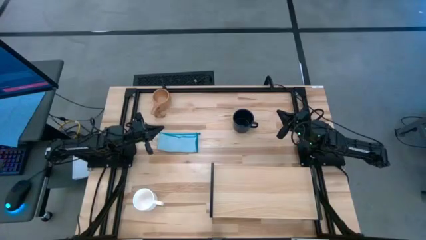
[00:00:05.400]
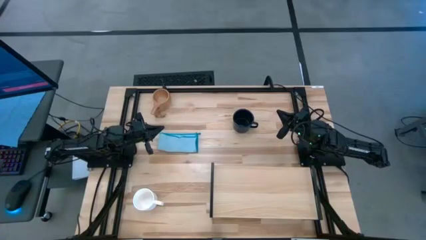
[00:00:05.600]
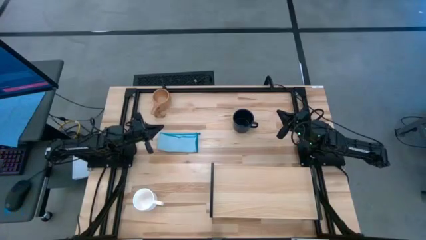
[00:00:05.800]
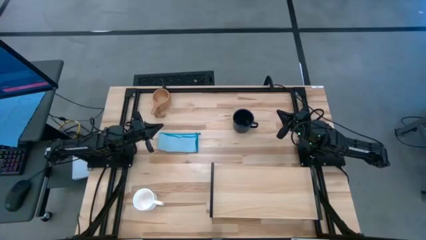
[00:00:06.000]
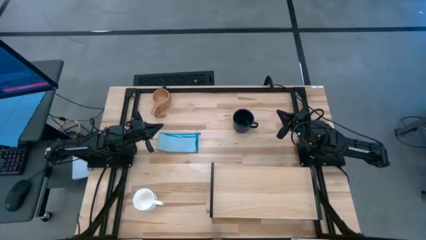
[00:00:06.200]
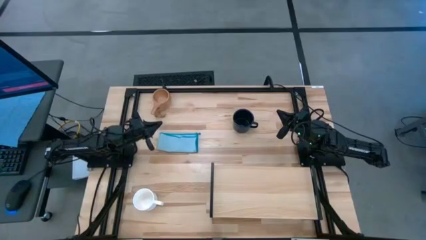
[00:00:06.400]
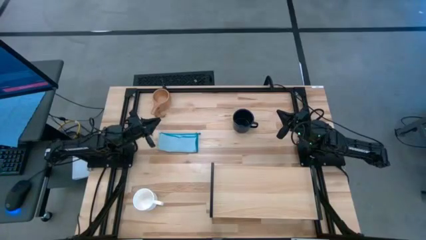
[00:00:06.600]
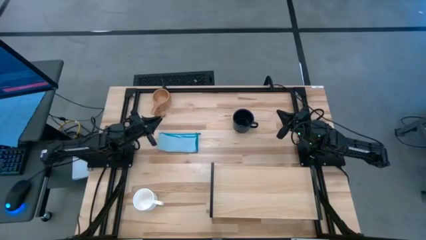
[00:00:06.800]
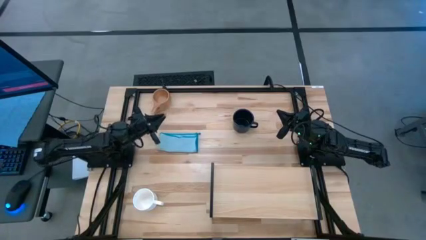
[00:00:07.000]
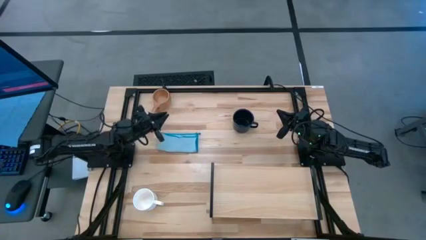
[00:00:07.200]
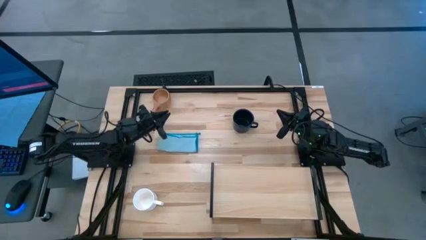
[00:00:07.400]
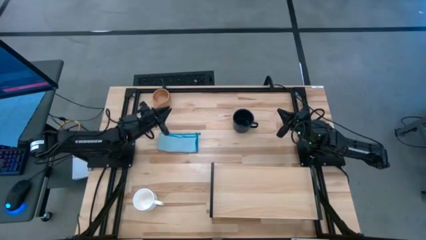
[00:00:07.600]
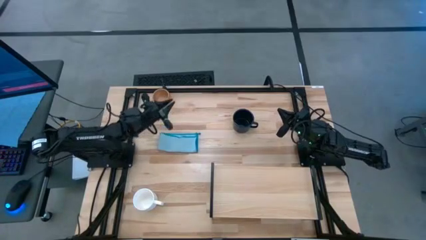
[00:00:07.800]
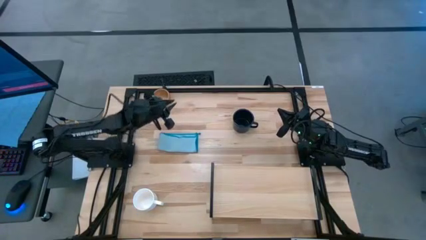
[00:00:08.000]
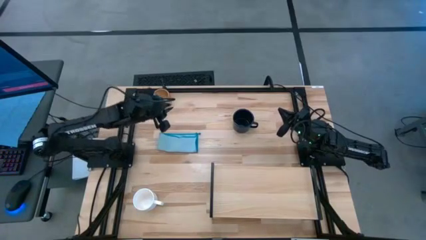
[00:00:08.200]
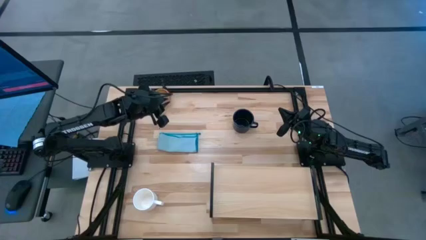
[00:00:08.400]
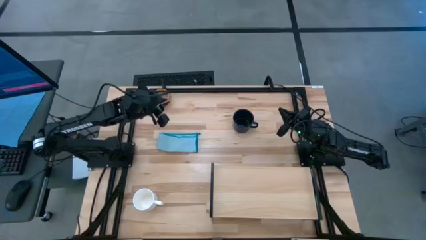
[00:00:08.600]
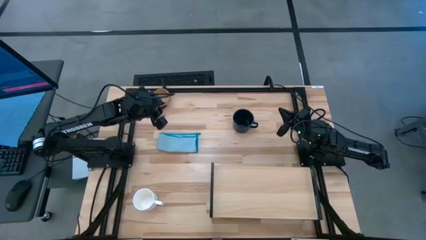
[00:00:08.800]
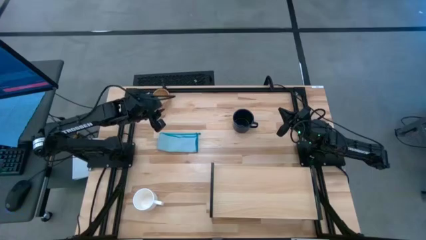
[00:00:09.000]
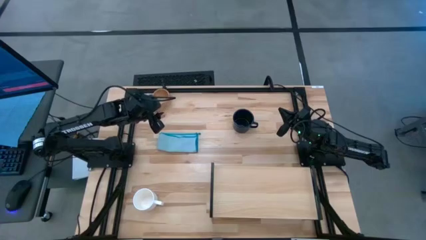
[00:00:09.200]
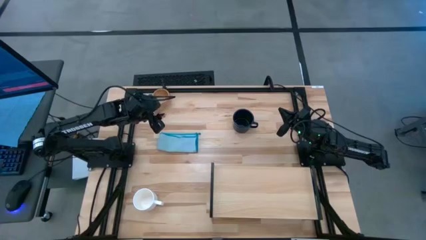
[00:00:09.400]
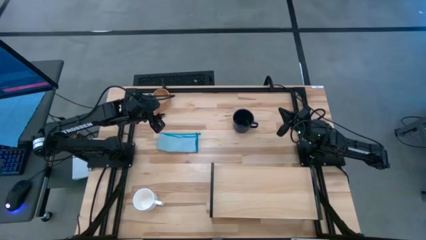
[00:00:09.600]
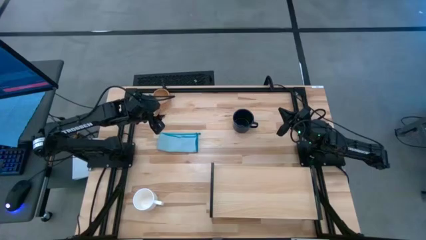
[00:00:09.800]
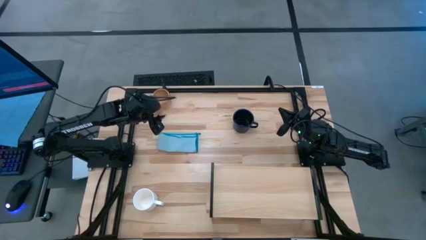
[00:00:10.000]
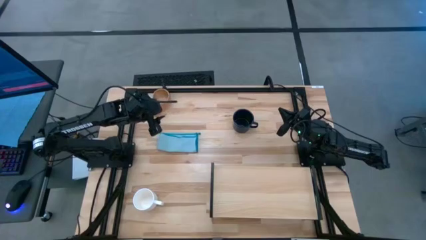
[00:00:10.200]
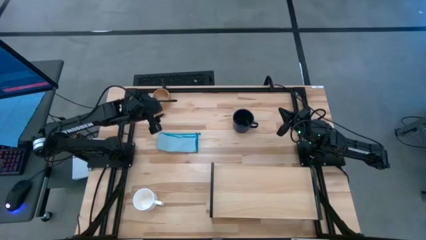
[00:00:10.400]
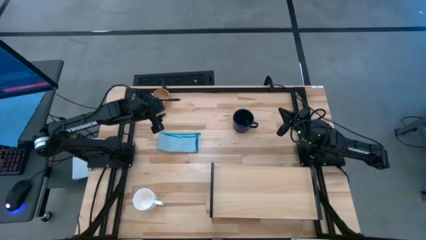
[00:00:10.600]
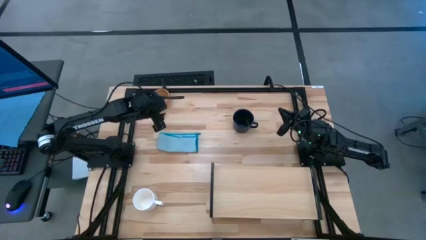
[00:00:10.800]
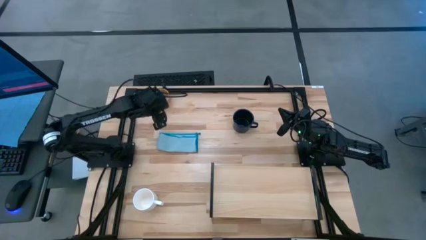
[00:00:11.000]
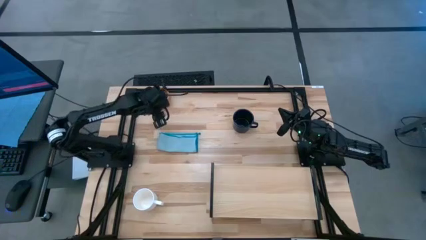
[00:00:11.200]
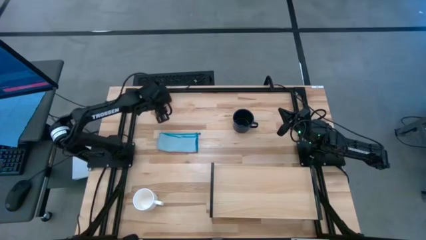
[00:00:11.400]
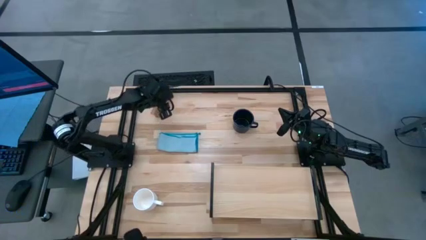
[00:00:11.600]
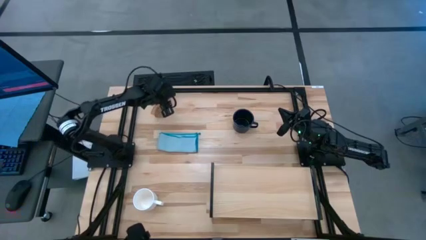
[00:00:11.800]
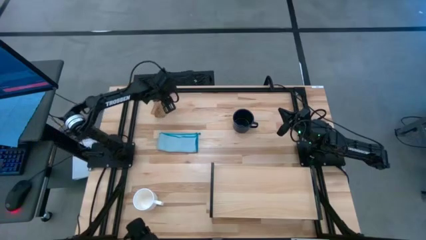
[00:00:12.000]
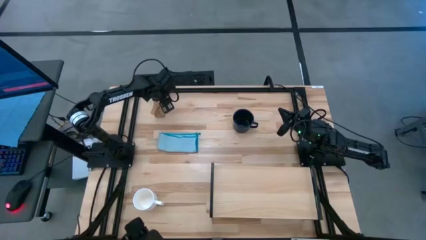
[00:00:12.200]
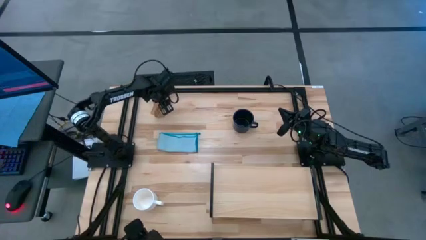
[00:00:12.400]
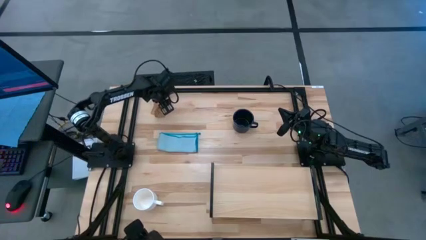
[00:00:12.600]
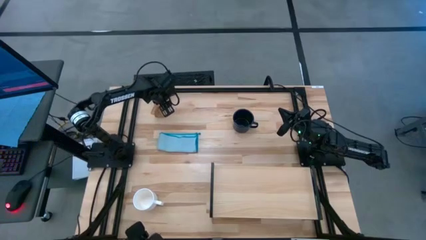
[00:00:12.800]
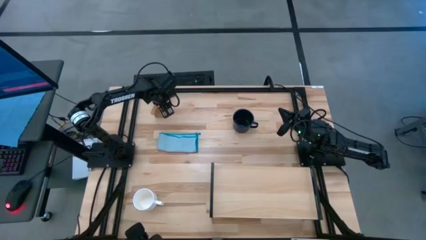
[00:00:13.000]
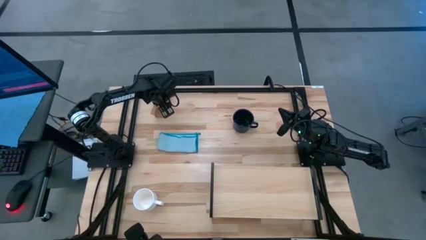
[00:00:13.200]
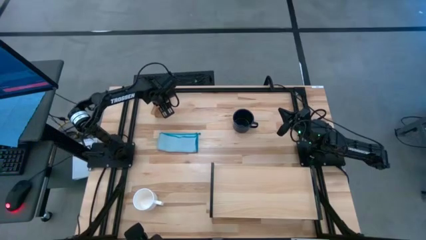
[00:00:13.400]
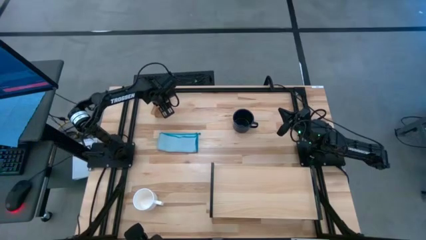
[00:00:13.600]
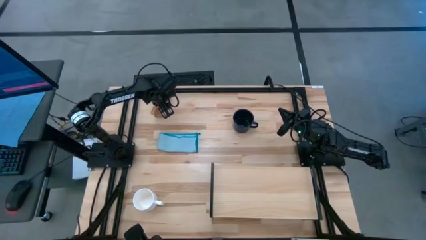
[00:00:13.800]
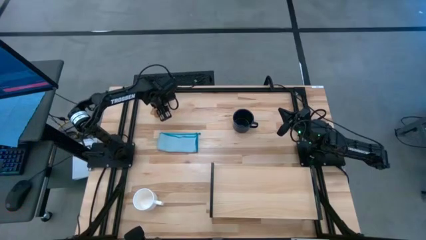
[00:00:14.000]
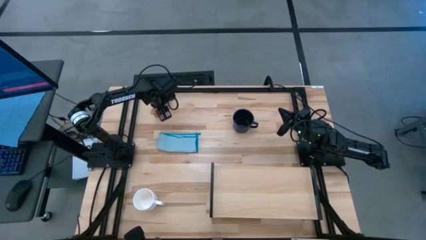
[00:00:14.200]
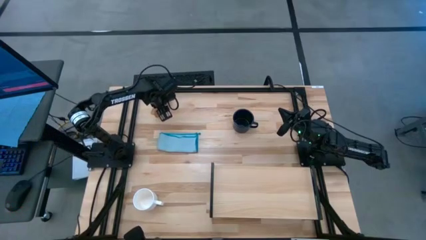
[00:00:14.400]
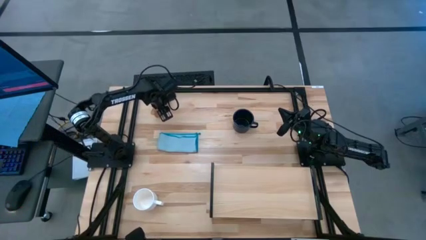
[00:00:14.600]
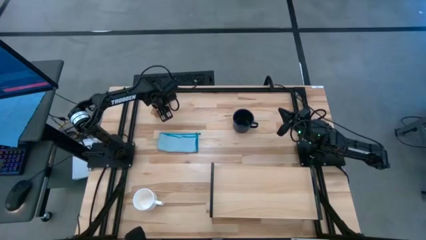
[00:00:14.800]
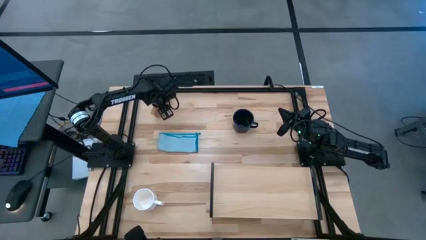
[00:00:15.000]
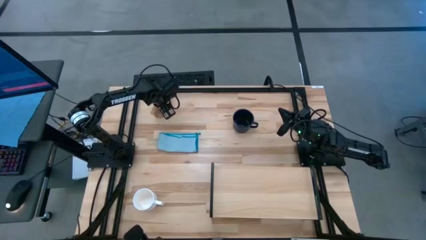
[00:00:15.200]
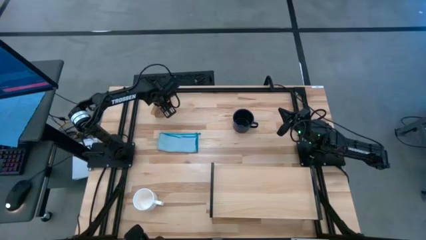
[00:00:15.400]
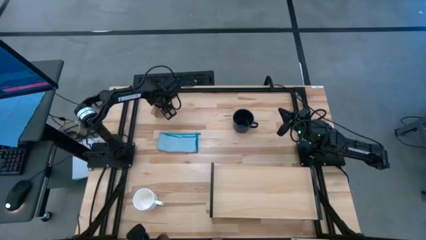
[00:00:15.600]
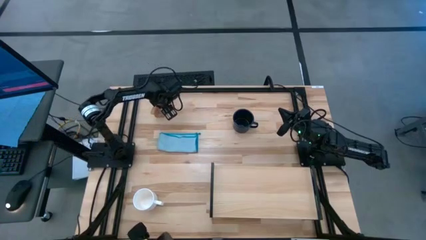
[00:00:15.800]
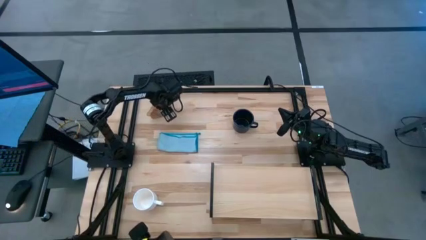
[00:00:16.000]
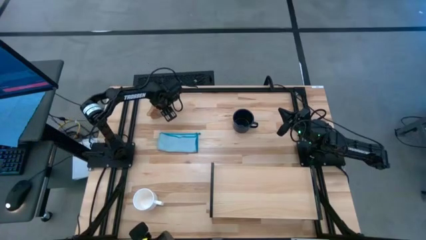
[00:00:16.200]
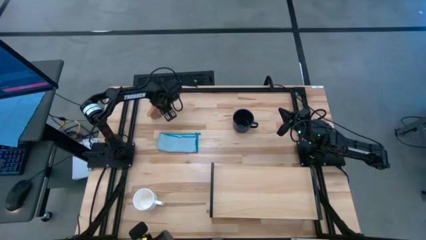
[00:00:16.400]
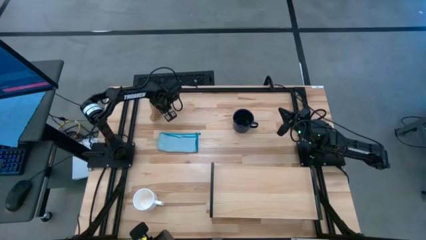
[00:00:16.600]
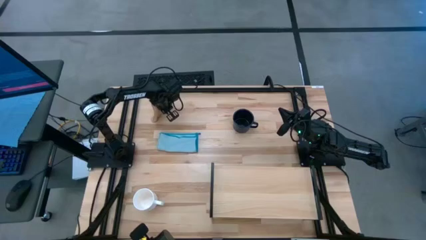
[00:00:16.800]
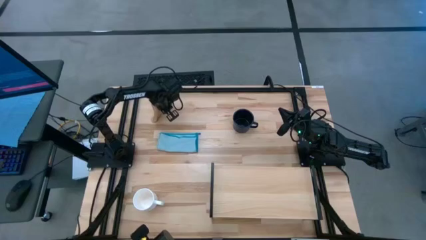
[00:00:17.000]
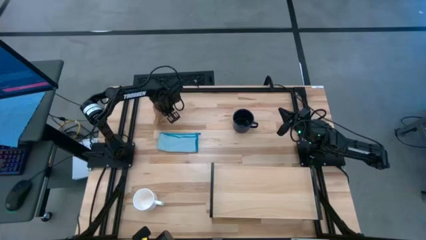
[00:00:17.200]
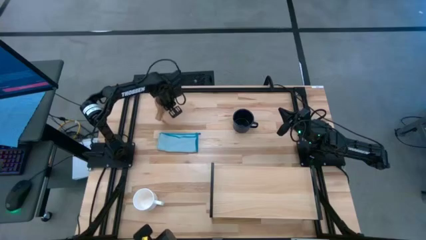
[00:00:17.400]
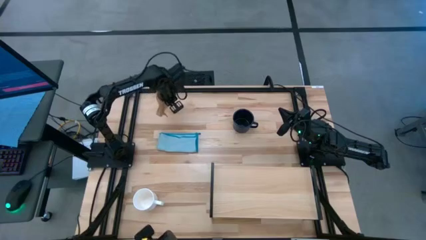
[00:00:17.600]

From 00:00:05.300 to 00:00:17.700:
Task: Stack small to large cups/mugs on shelf
Put the brown mug on the shelf

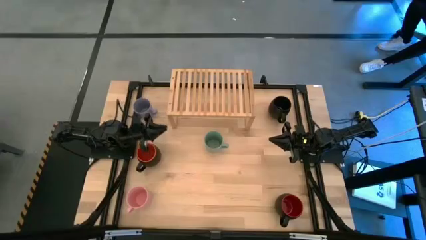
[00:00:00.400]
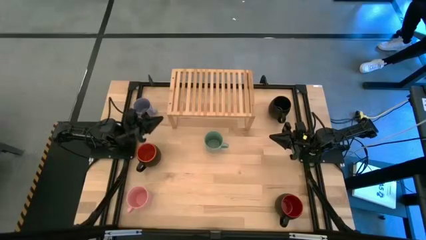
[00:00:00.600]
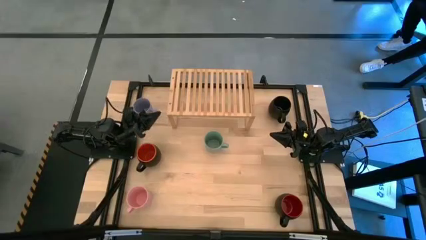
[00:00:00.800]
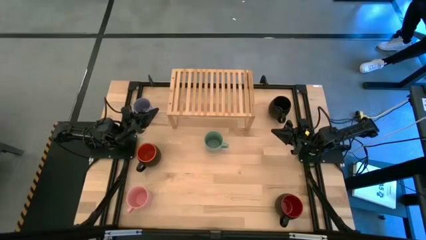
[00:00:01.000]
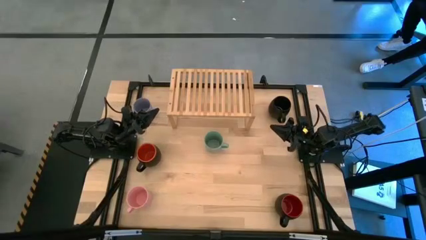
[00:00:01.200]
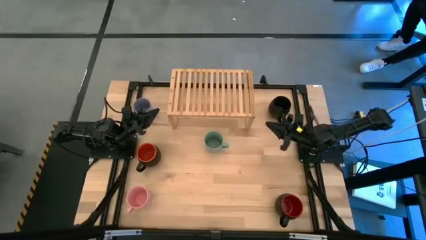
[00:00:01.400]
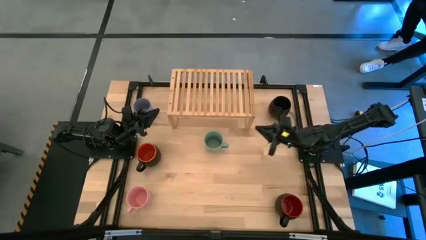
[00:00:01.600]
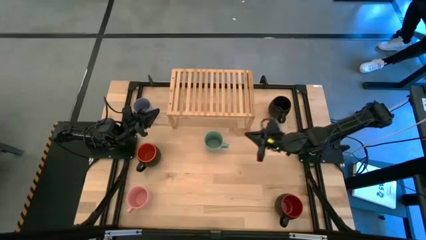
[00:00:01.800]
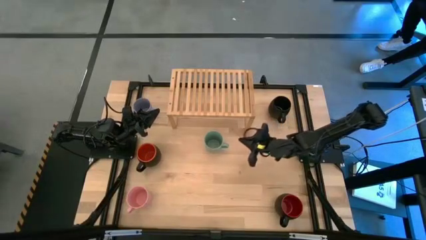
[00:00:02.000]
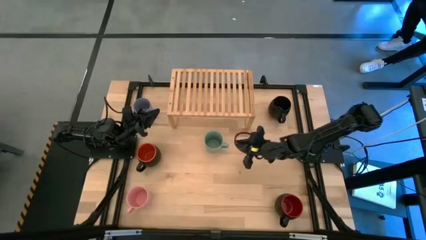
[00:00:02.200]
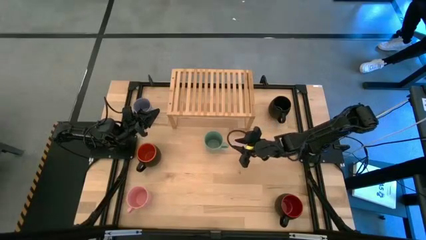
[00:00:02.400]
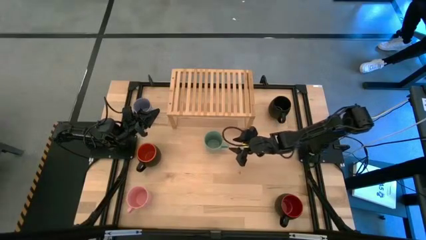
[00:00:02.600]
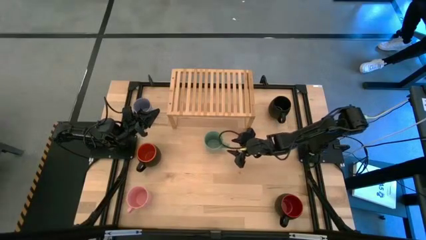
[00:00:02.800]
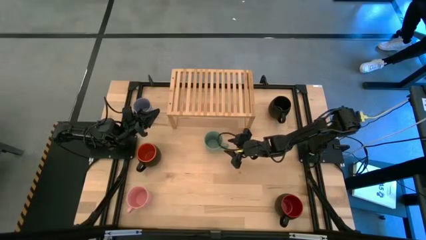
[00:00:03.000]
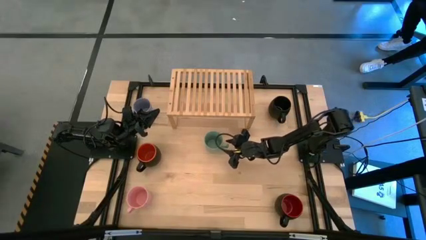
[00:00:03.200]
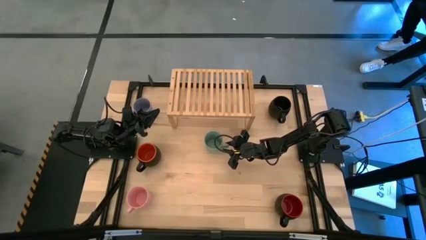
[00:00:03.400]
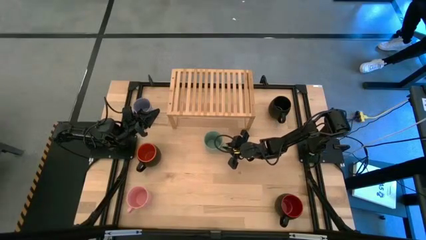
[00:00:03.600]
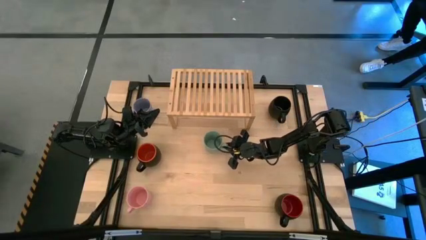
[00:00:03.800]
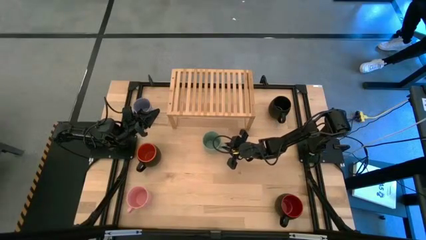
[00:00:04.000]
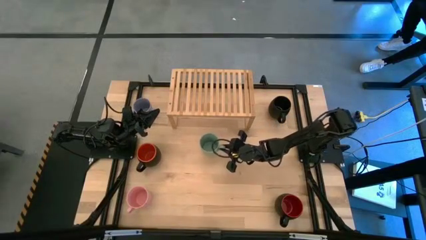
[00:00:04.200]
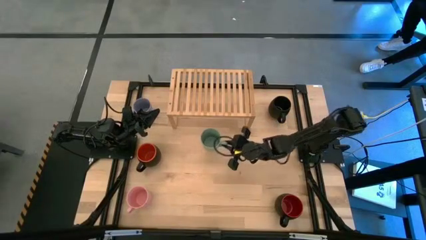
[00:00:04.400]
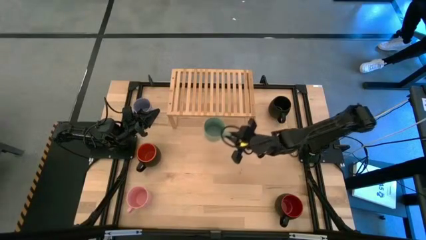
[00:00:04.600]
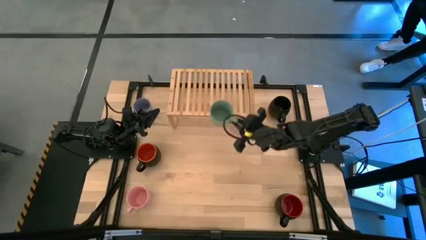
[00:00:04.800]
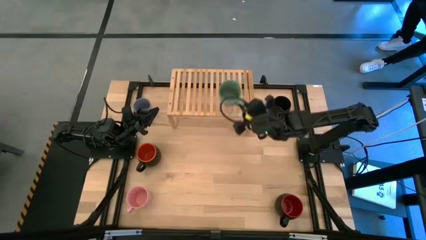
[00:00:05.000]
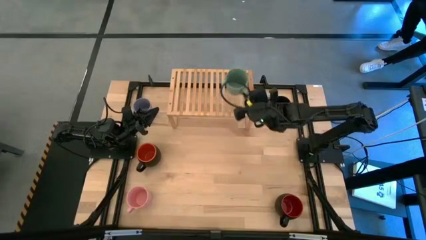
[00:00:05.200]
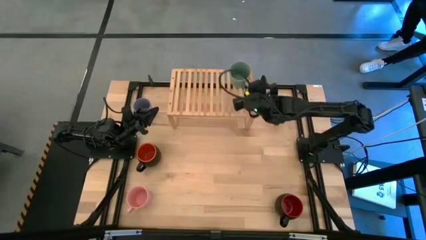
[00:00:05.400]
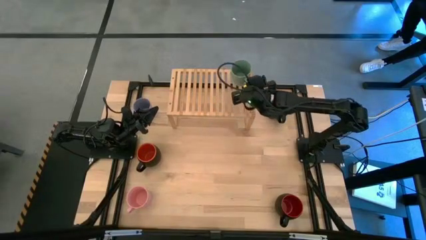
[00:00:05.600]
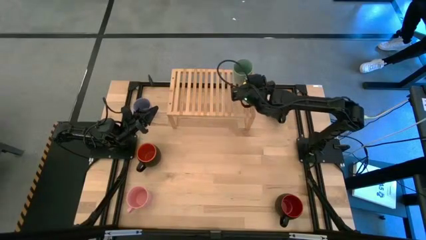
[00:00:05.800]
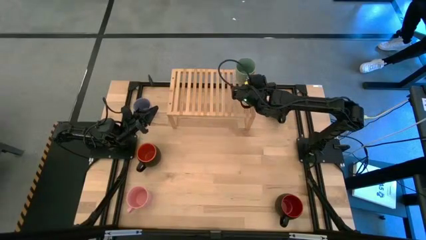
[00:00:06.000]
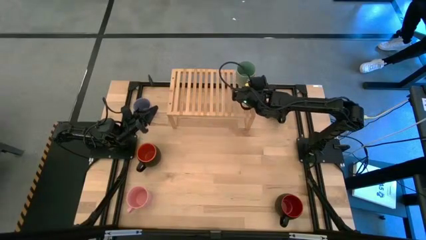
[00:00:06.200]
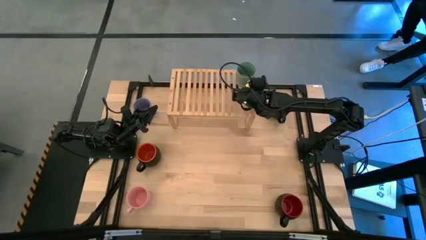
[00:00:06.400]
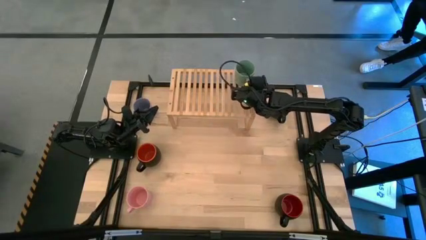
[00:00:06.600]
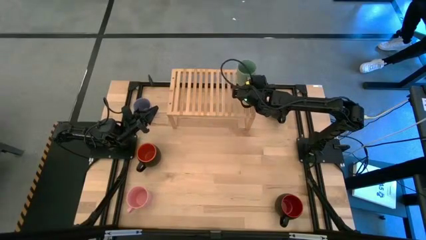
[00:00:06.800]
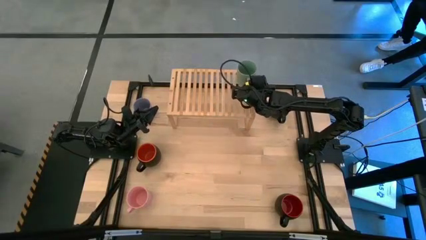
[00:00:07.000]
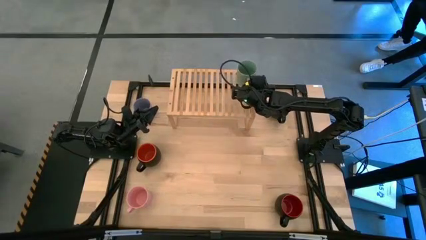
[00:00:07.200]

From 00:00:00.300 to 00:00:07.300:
Task: Place coffee mugs
Put the green mug on the shelf
